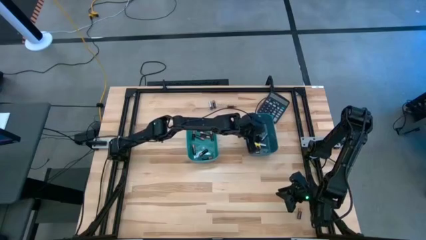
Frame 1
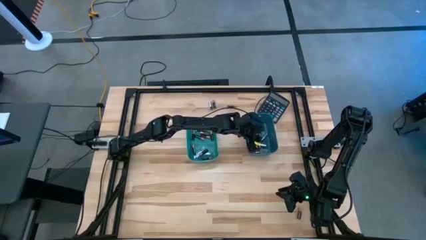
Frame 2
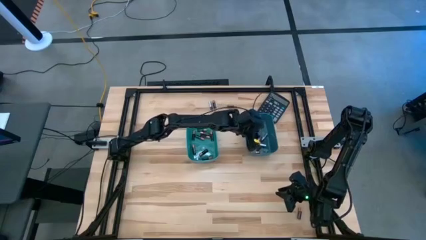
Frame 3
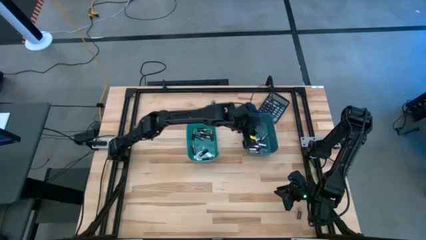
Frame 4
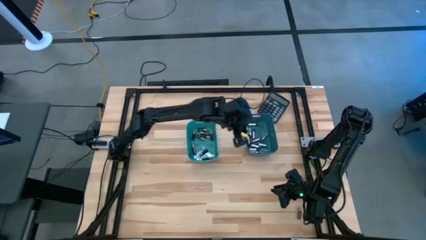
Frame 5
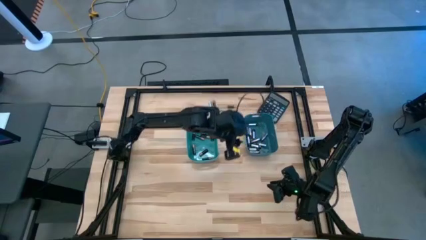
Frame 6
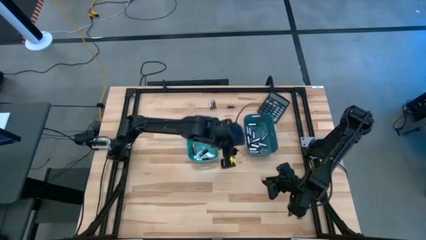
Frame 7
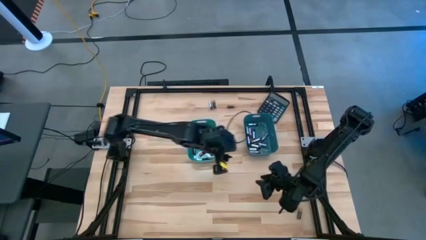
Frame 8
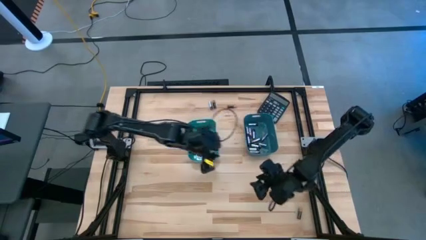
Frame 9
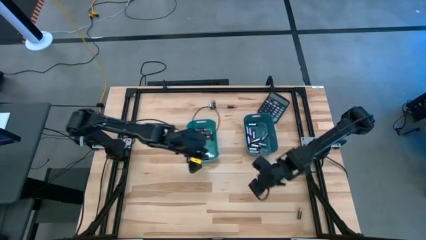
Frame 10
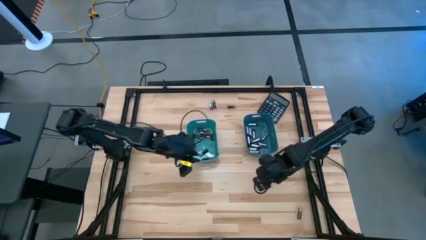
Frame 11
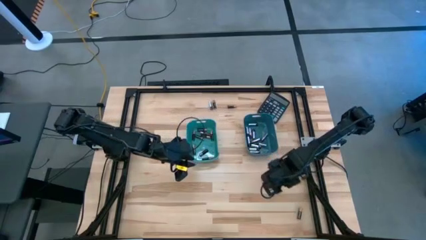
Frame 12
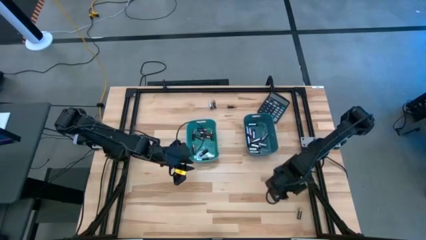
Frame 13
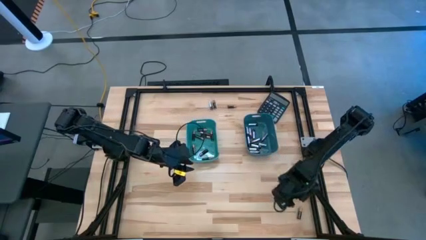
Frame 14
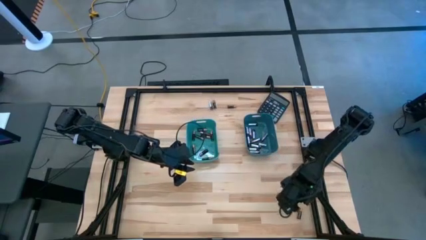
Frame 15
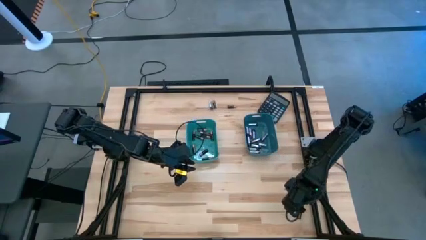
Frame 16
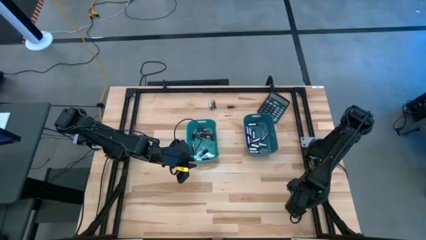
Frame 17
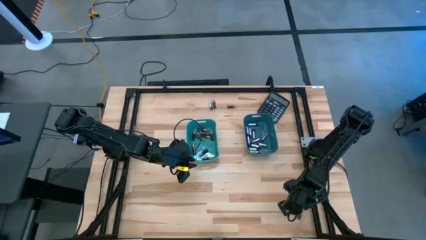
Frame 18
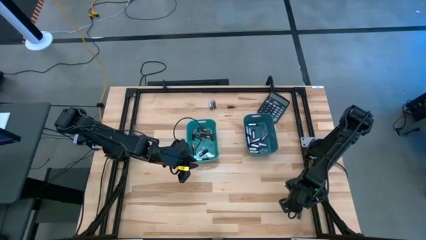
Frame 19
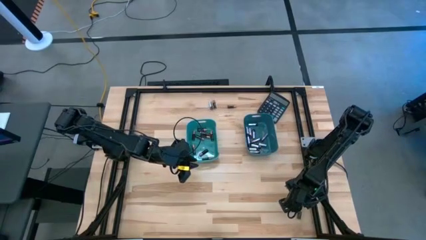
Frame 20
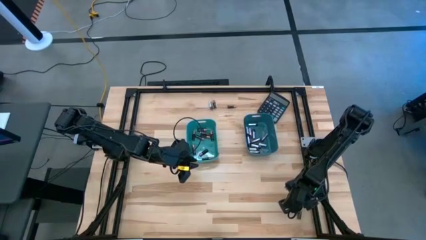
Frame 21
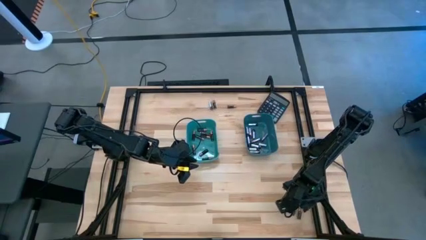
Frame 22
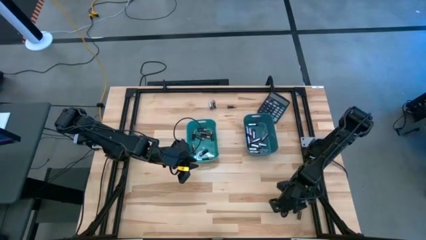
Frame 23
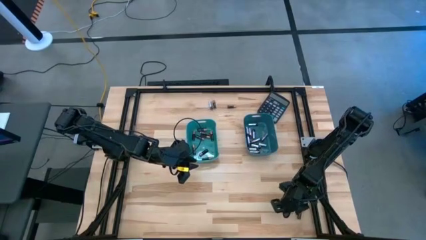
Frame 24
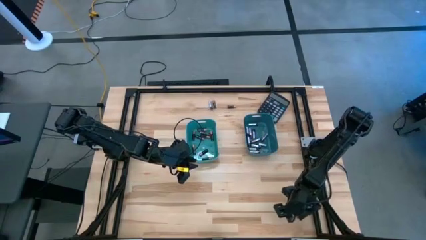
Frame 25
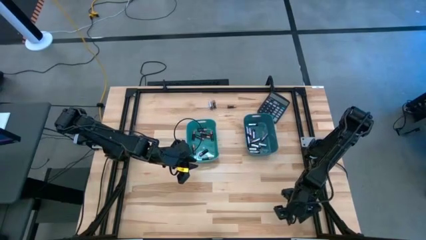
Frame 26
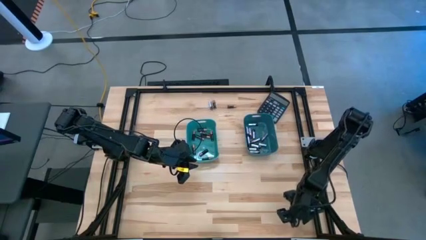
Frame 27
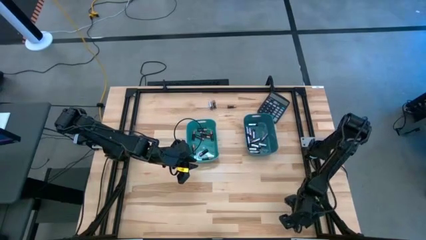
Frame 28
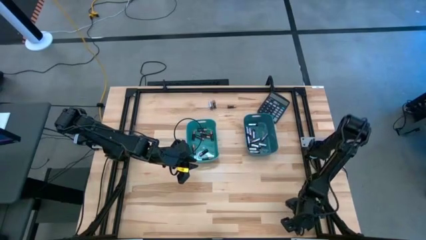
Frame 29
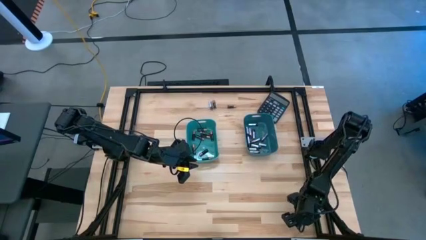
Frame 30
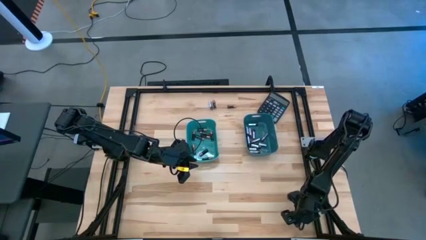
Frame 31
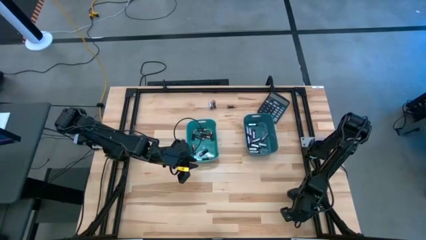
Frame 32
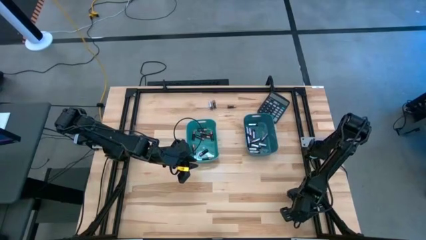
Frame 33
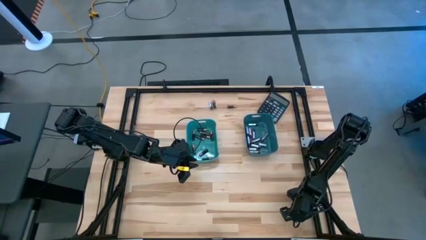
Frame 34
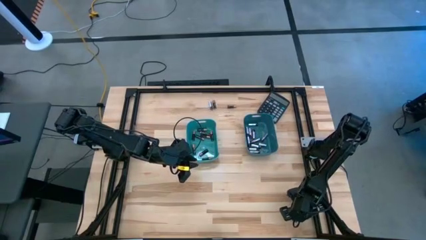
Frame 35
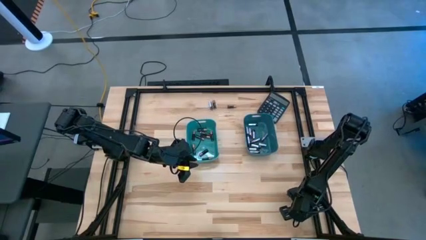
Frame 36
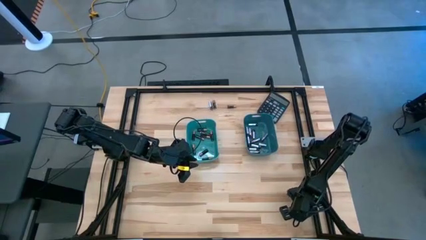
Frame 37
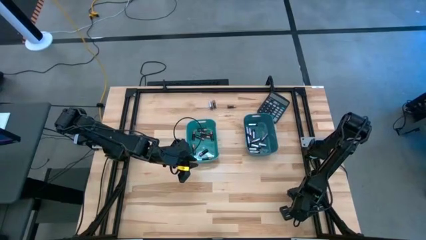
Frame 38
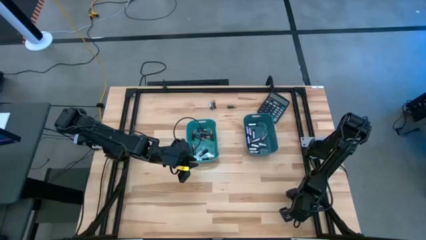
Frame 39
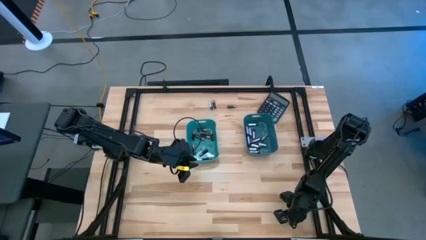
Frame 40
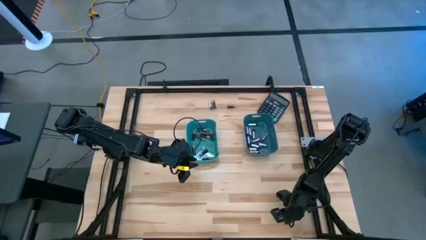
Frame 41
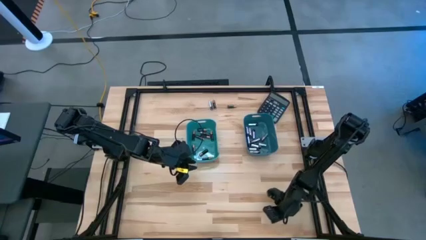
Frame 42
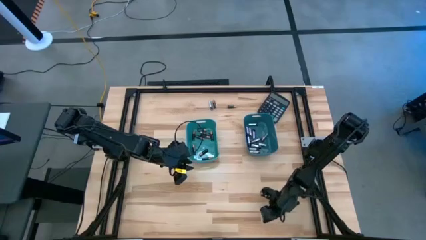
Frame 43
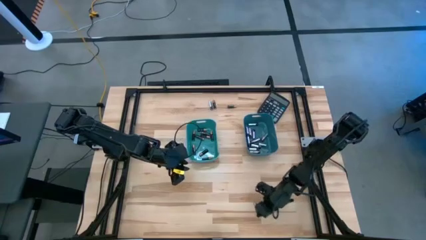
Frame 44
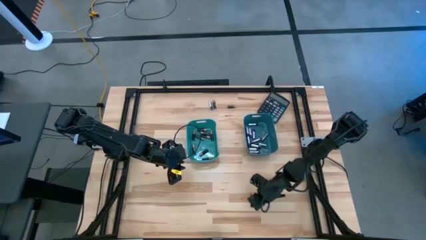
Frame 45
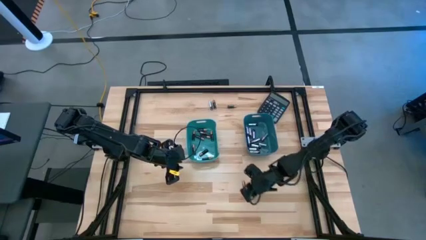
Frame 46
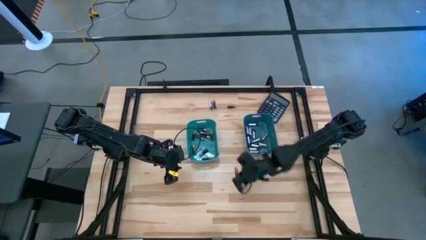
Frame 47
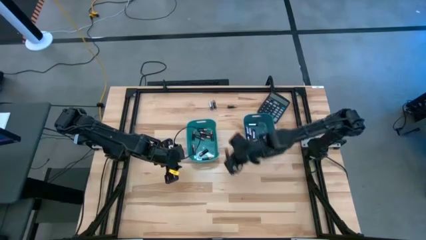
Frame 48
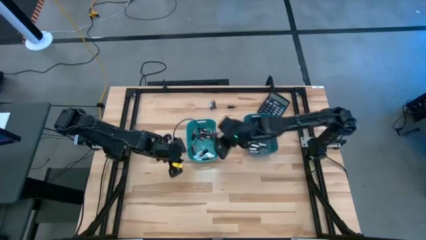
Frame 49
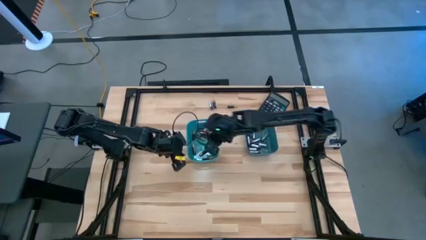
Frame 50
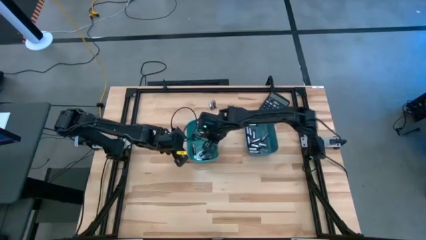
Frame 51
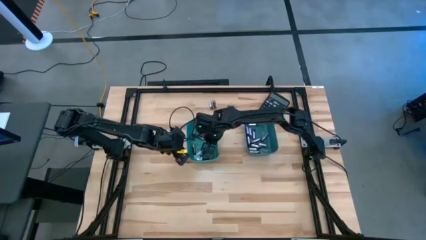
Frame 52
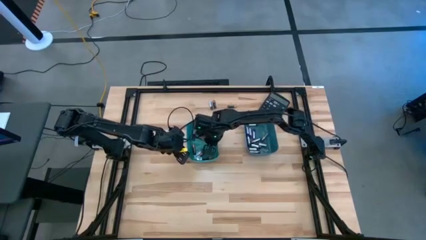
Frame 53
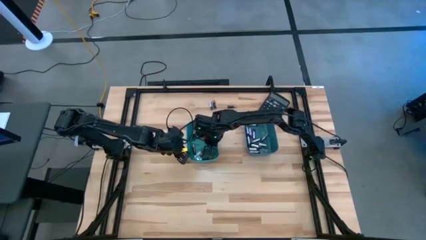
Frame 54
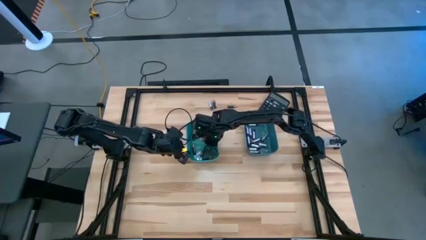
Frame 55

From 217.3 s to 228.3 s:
Task: Sort batteries
Put the black battery into the green bin

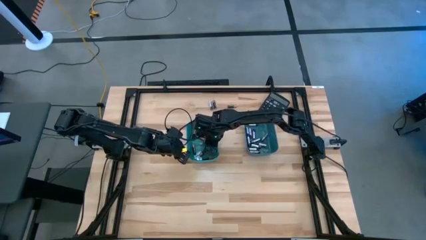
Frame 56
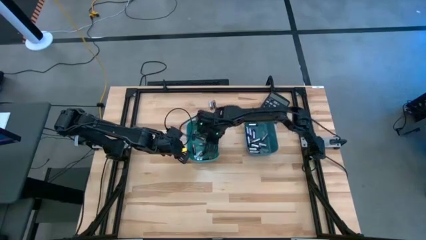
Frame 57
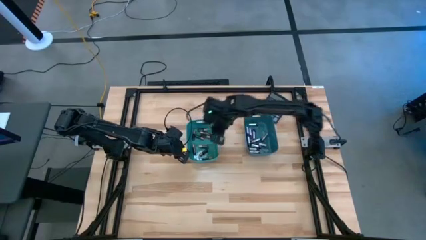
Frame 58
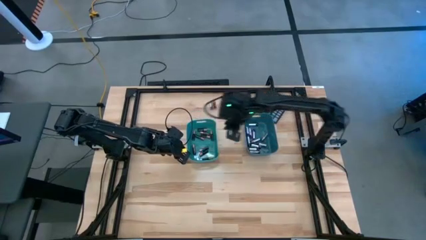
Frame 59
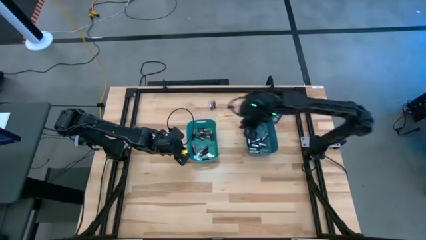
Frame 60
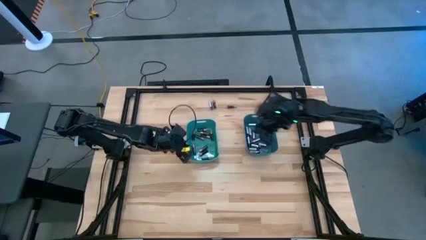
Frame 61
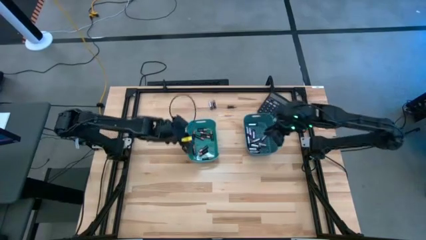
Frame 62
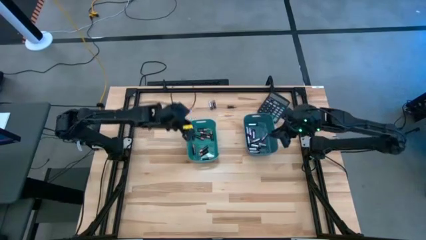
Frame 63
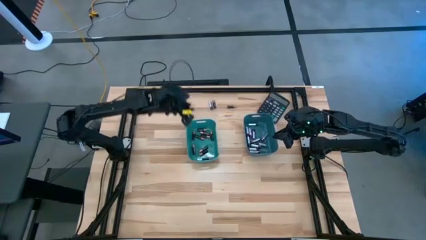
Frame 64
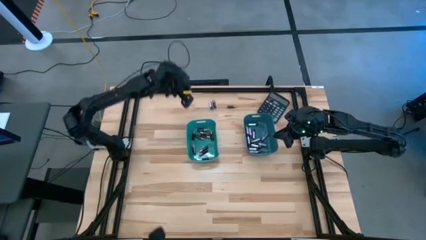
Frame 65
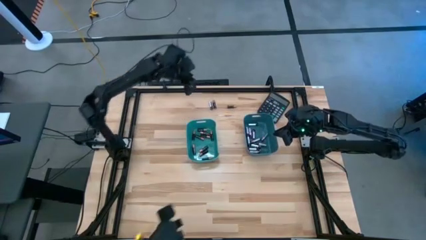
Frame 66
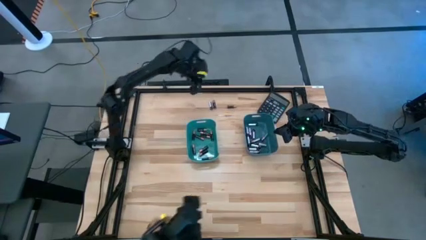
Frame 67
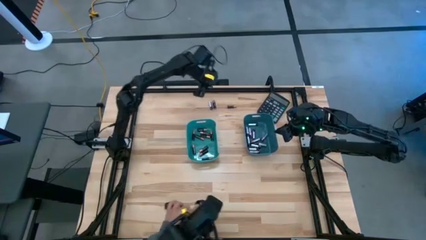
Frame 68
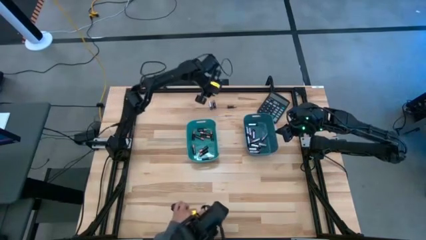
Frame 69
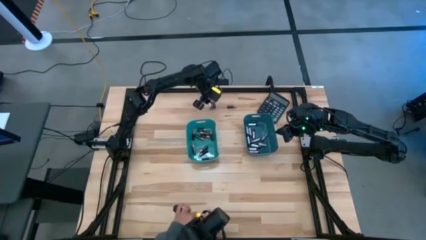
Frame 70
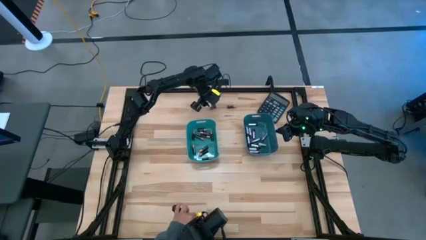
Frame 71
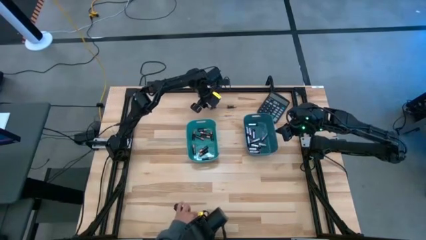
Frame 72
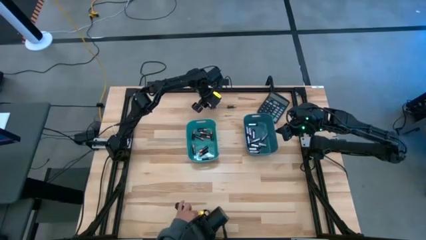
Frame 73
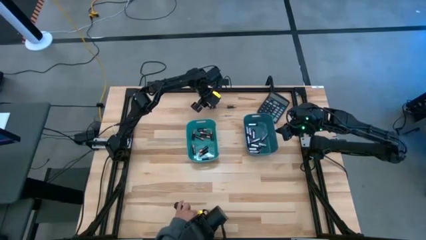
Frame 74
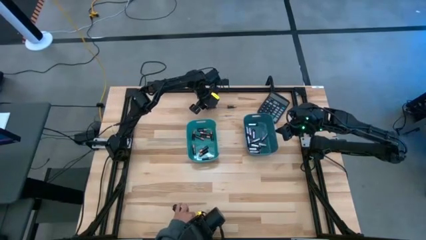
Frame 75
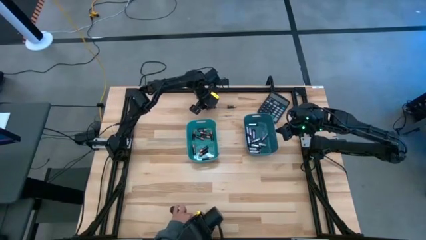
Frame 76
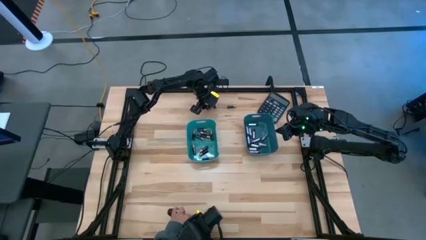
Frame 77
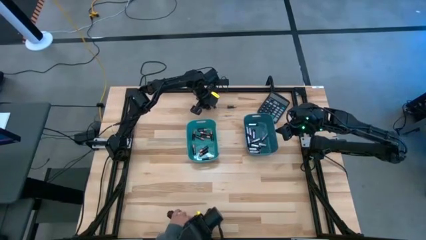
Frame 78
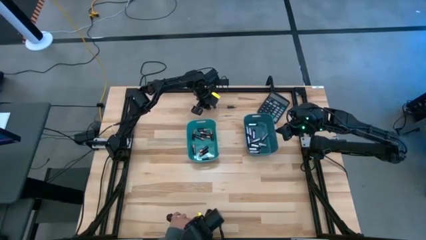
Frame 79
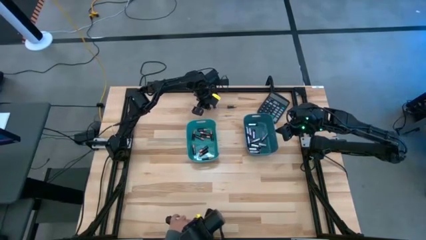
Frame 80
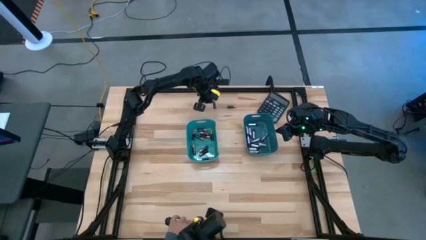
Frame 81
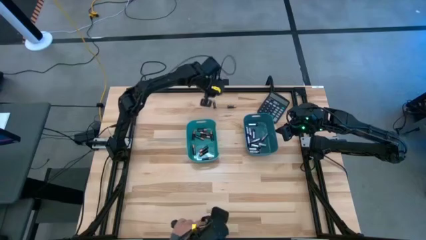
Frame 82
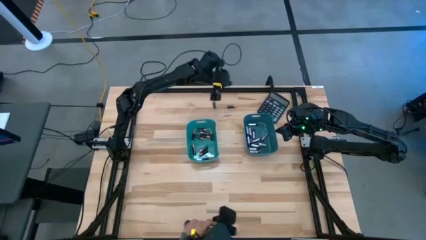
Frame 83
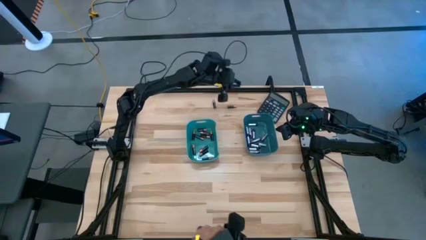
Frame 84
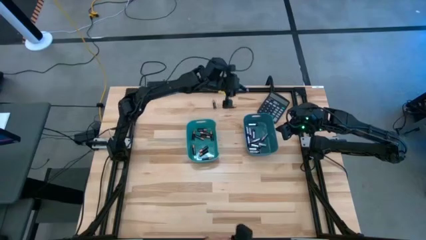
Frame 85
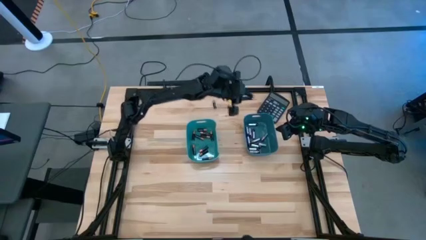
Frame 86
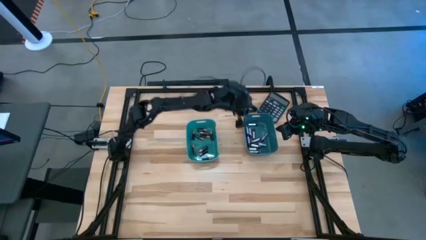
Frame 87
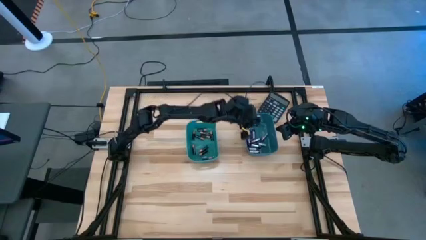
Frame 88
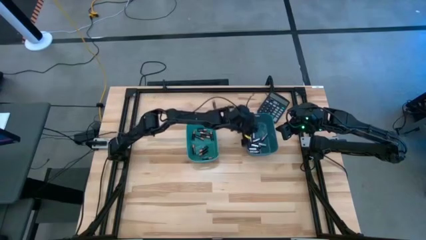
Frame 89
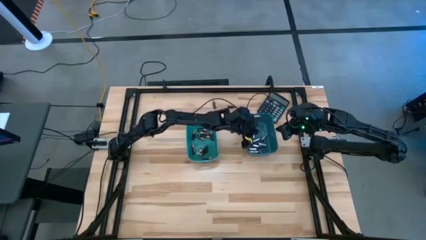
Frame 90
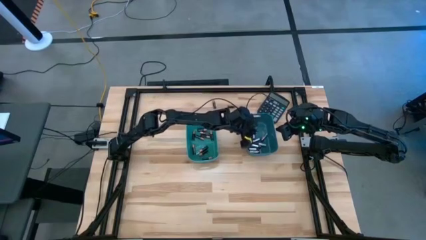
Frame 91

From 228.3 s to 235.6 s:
Put the silver battery into the blue bin
